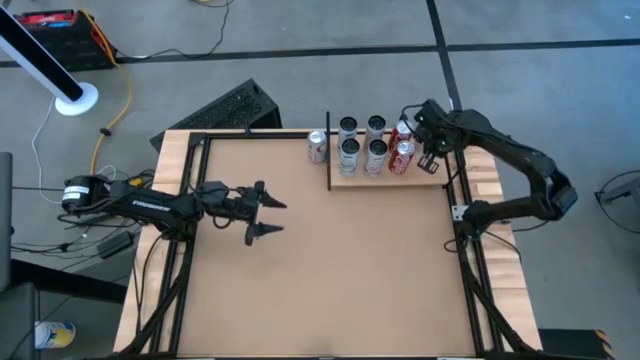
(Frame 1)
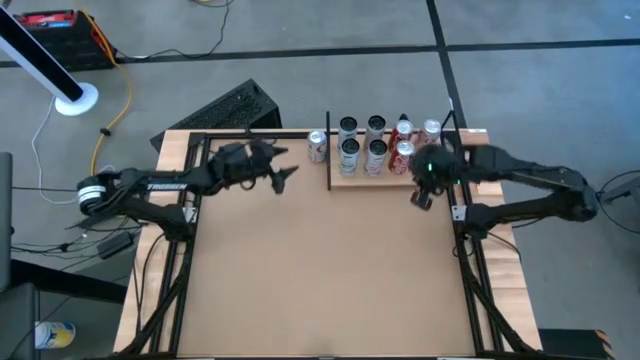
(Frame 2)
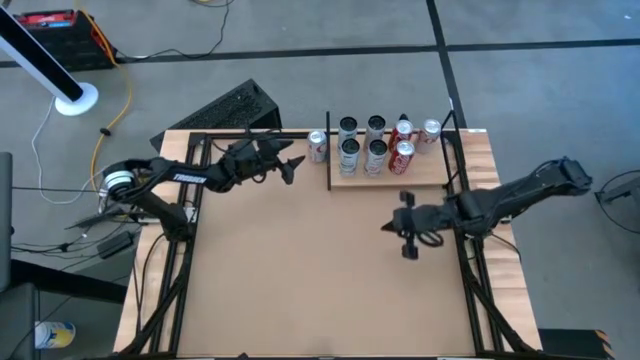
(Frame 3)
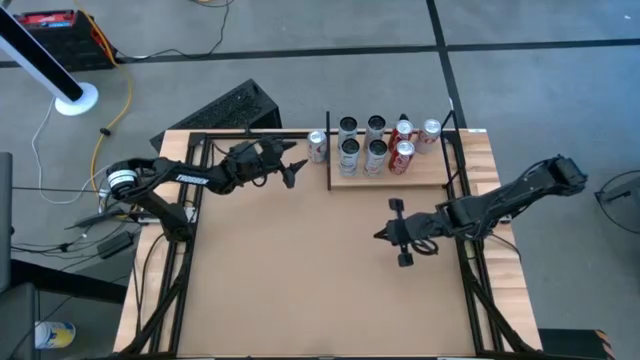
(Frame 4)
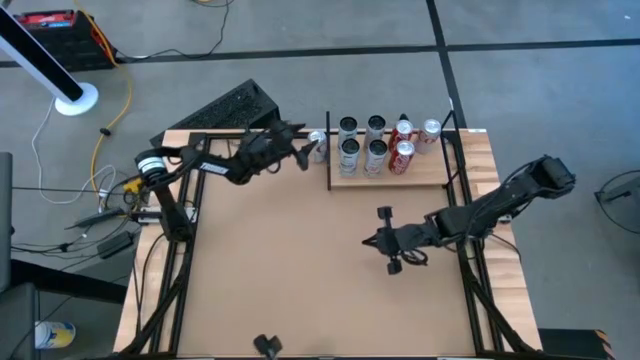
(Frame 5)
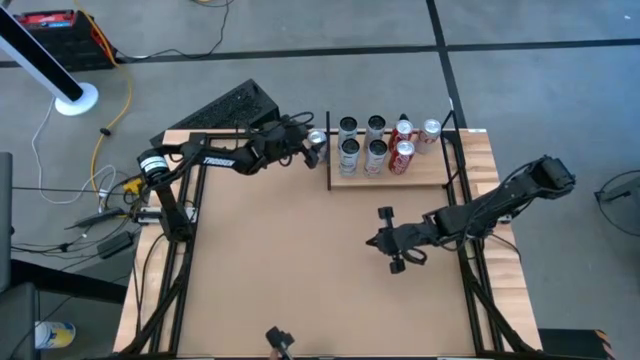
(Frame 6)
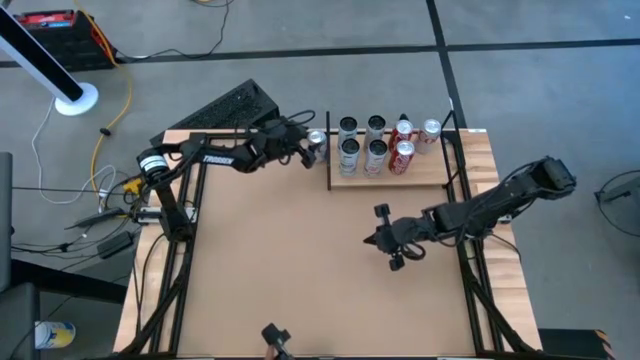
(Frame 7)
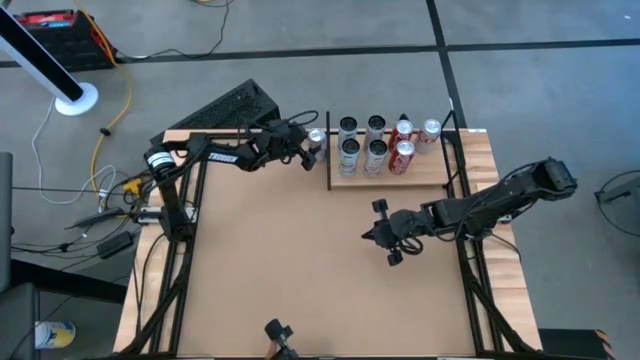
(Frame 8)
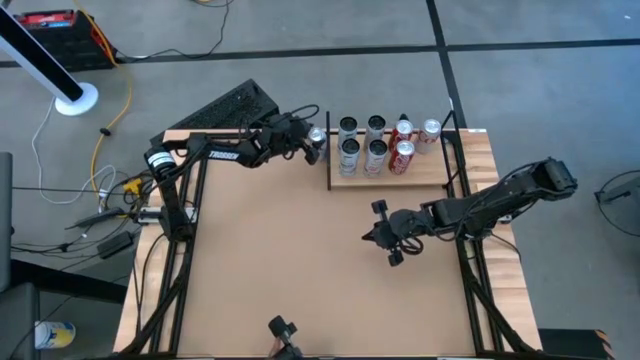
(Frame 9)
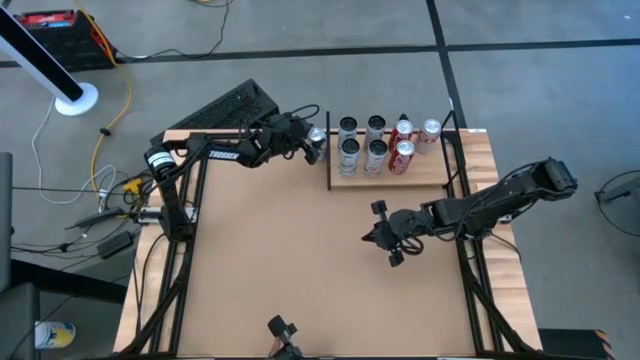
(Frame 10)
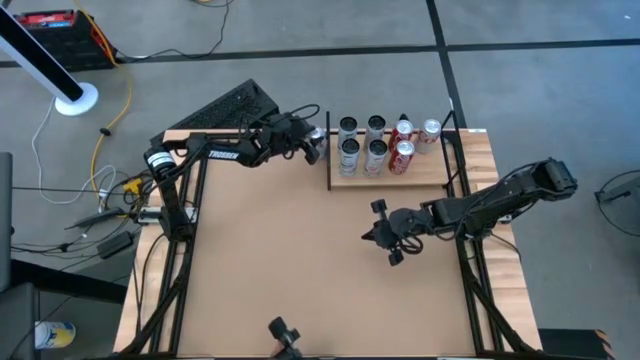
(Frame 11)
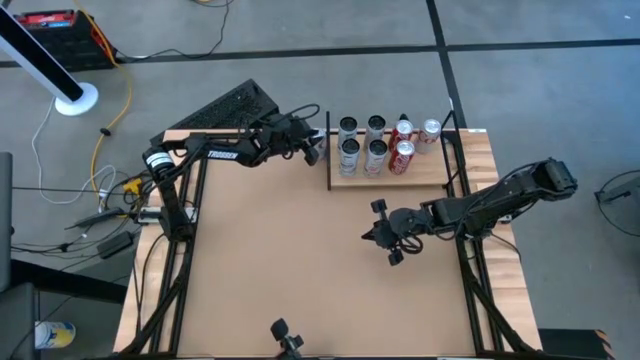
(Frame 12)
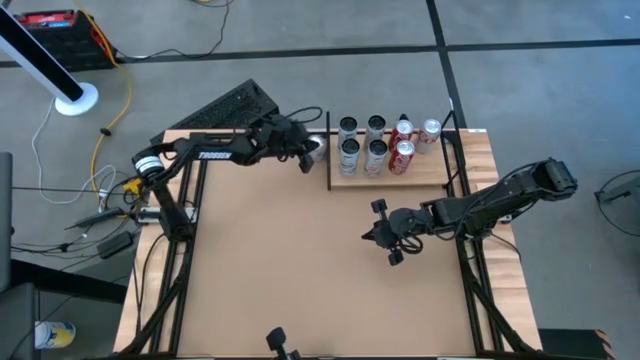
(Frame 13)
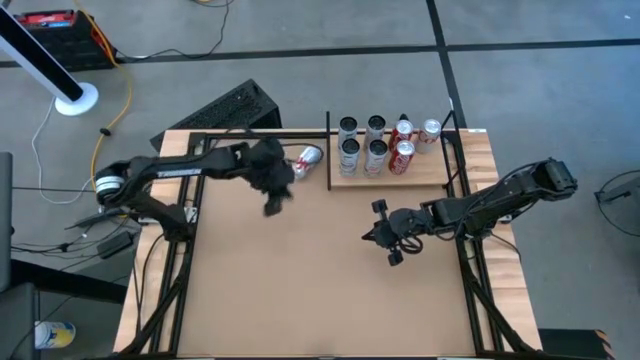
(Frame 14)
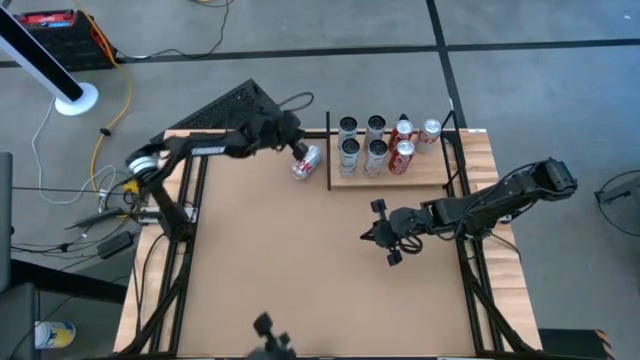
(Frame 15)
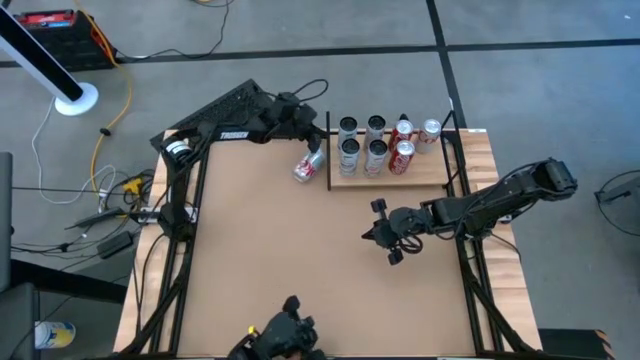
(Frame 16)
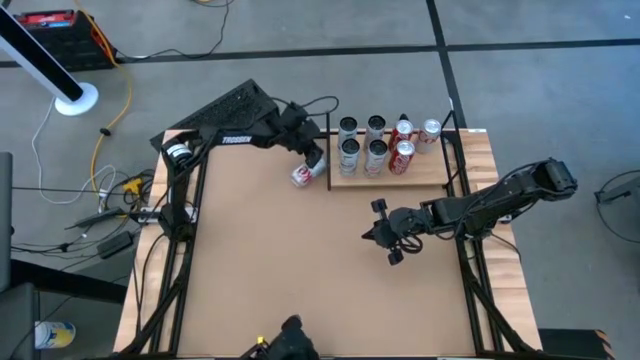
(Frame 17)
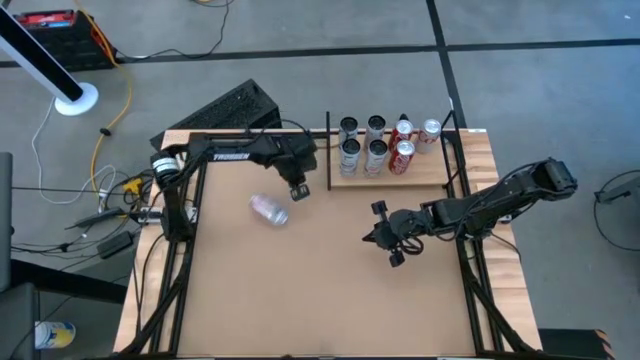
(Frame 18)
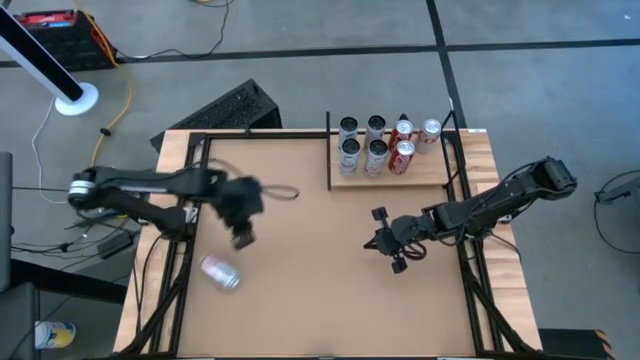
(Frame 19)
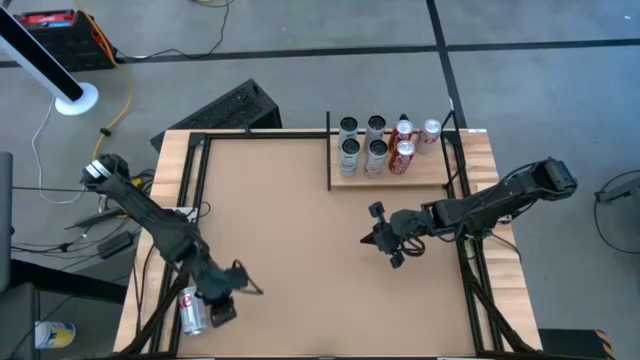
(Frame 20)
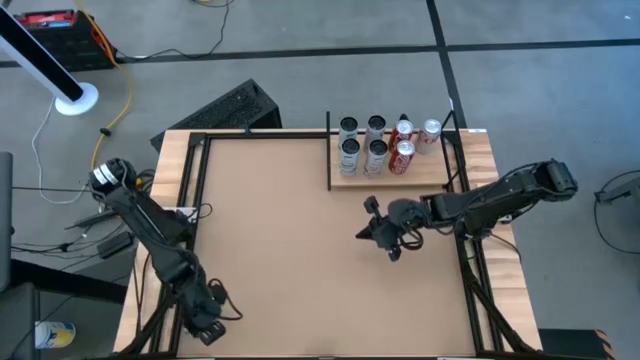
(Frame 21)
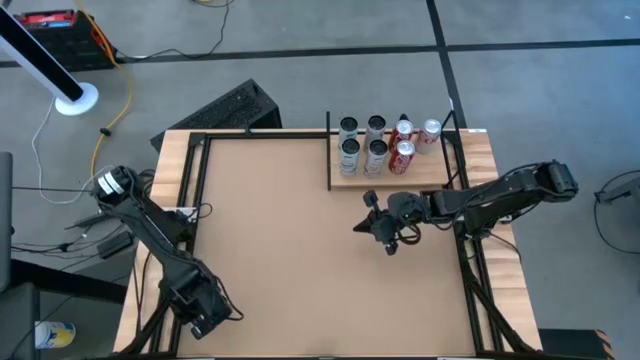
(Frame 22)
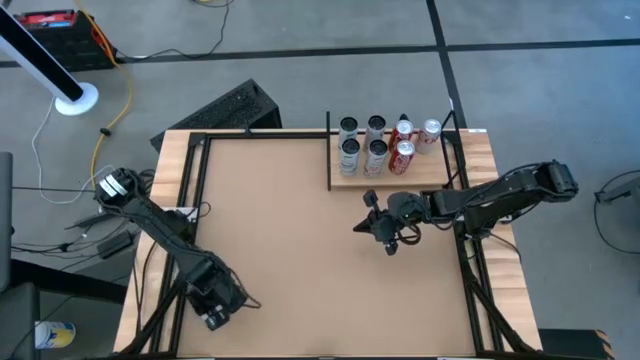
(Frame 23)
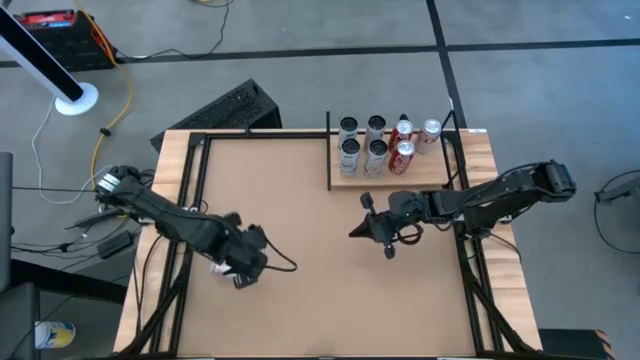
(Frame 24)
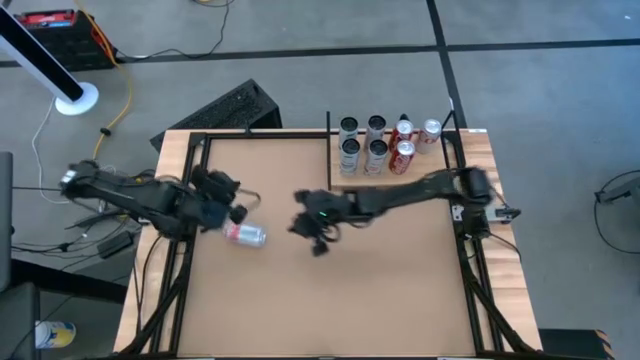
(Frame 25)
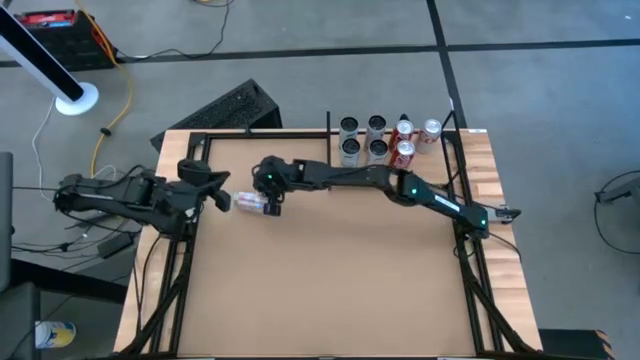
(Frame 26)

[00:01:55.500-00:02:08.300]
Task: Place canned beverage on shelf
Put the silver and red soda can on the shelf

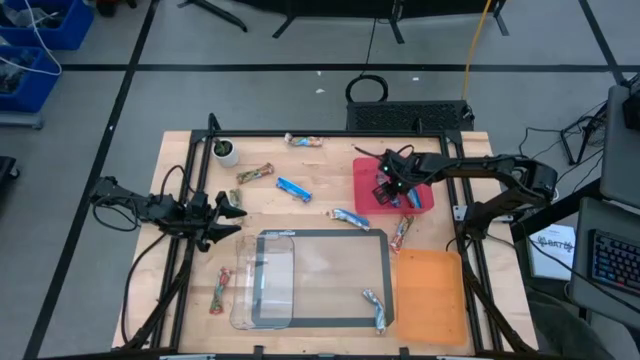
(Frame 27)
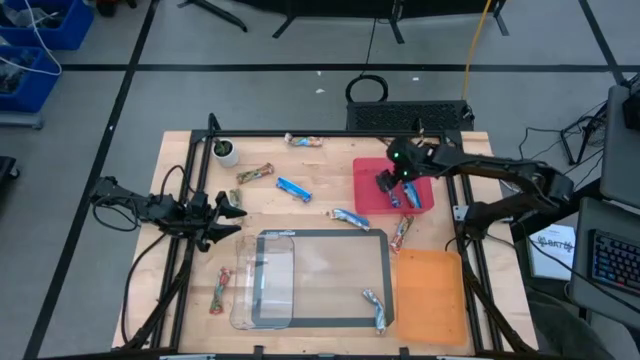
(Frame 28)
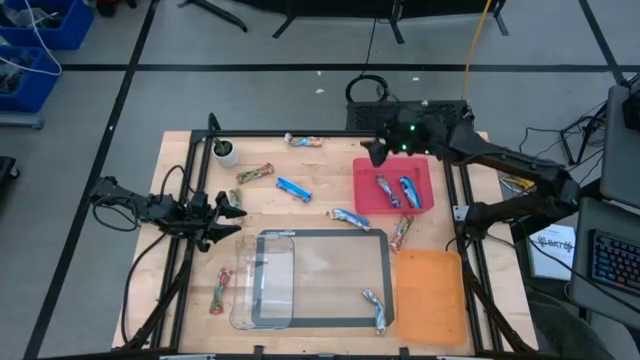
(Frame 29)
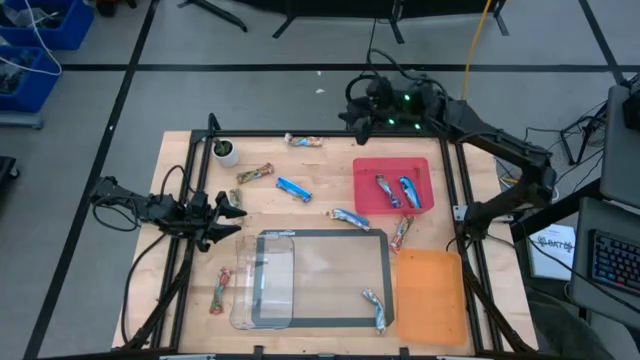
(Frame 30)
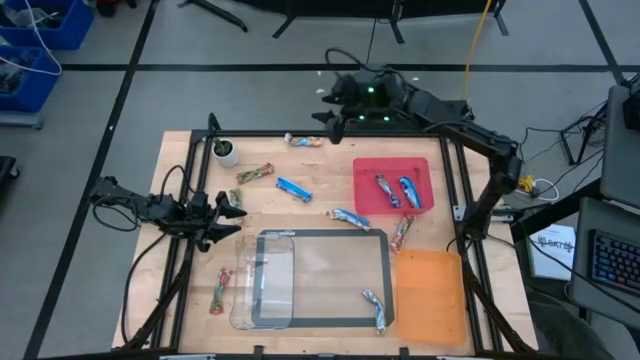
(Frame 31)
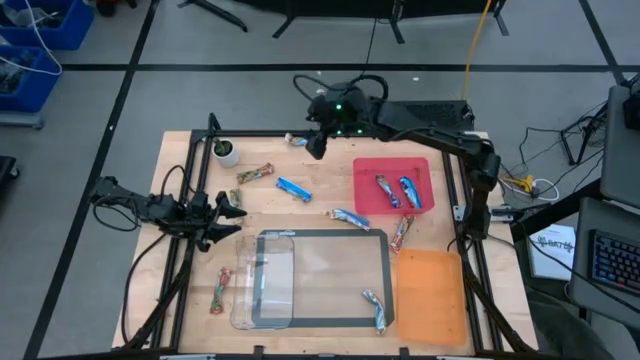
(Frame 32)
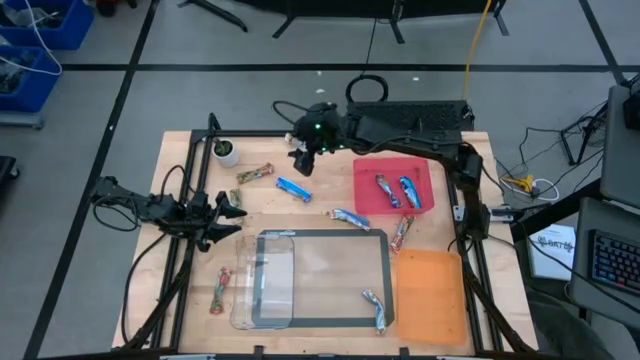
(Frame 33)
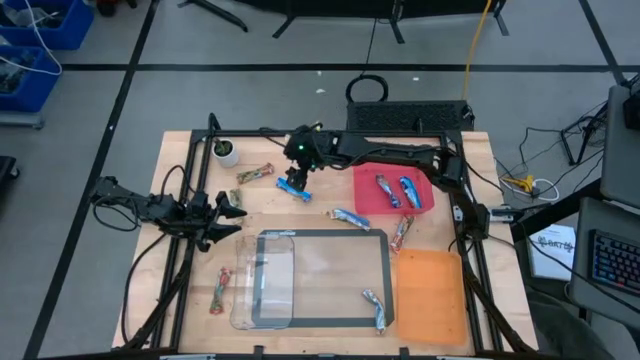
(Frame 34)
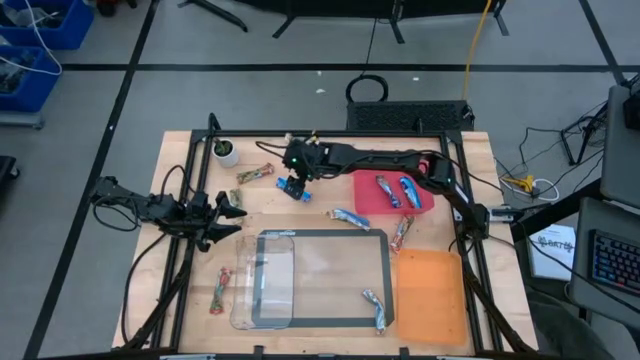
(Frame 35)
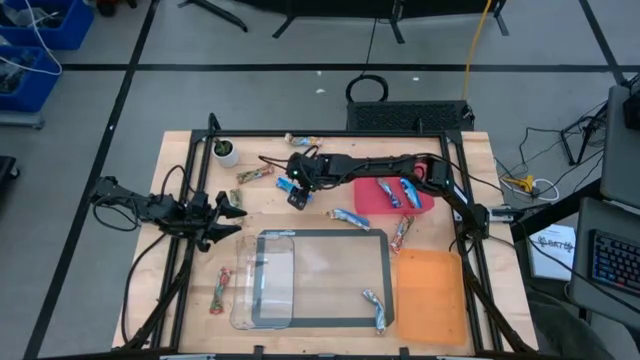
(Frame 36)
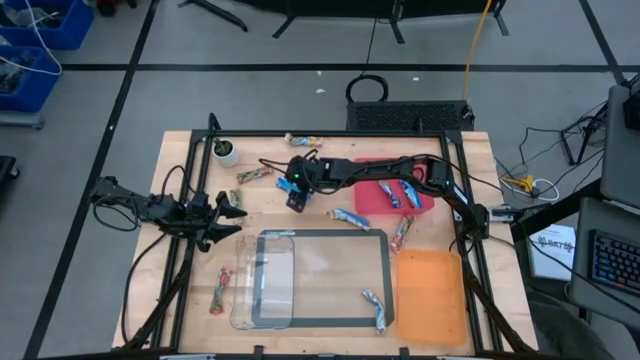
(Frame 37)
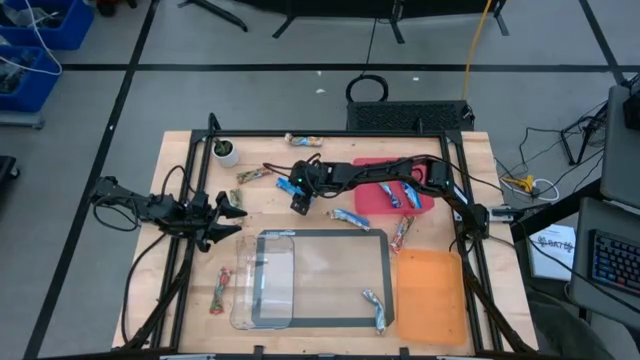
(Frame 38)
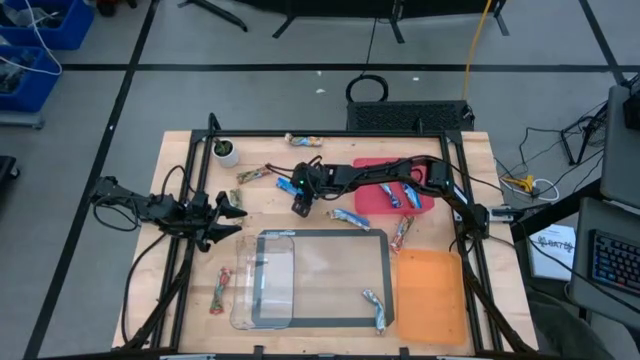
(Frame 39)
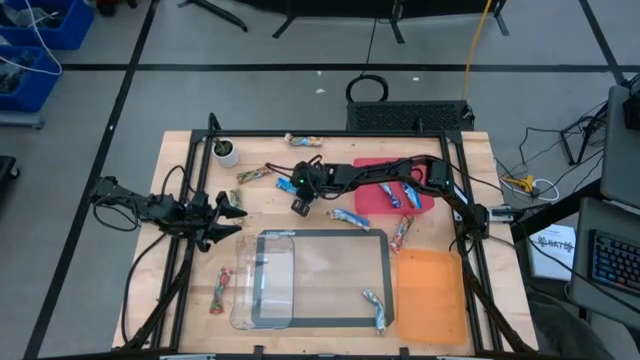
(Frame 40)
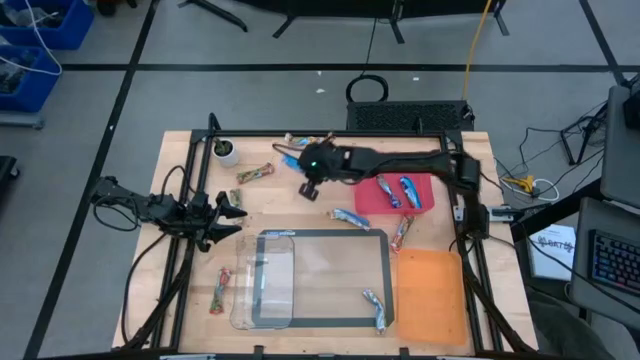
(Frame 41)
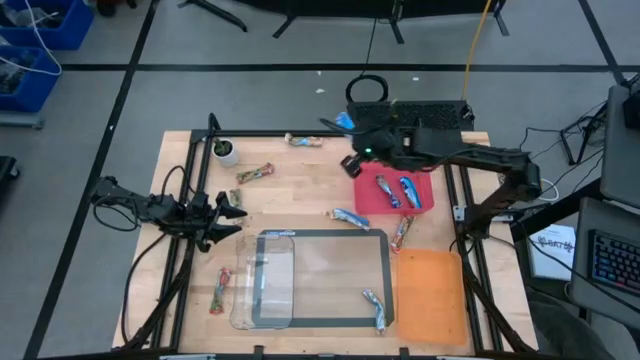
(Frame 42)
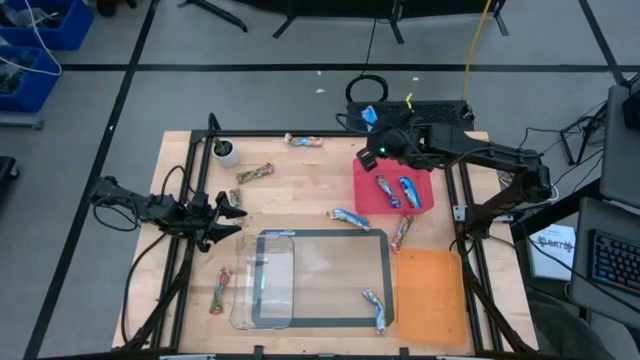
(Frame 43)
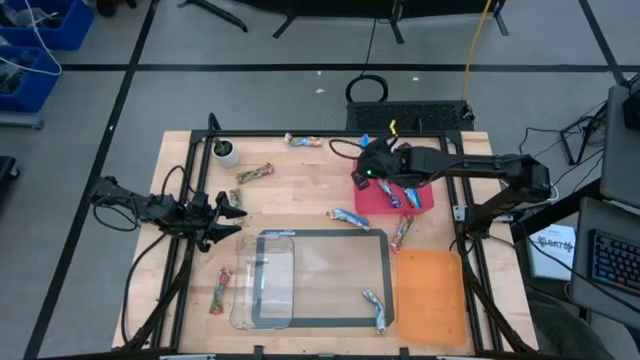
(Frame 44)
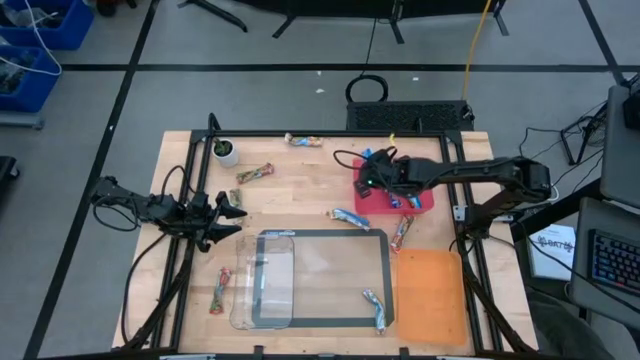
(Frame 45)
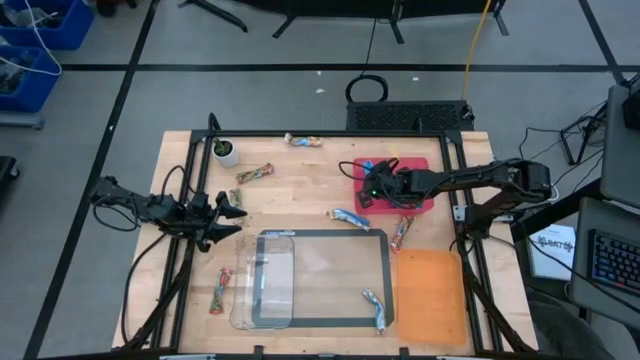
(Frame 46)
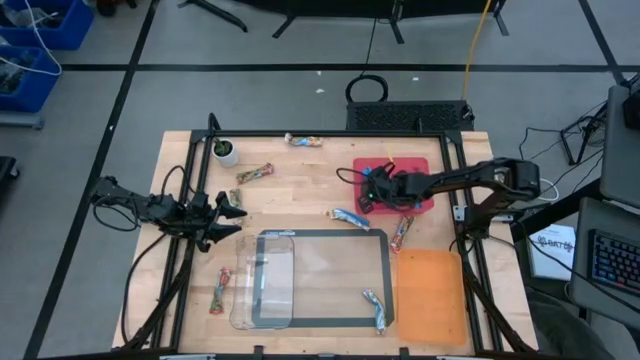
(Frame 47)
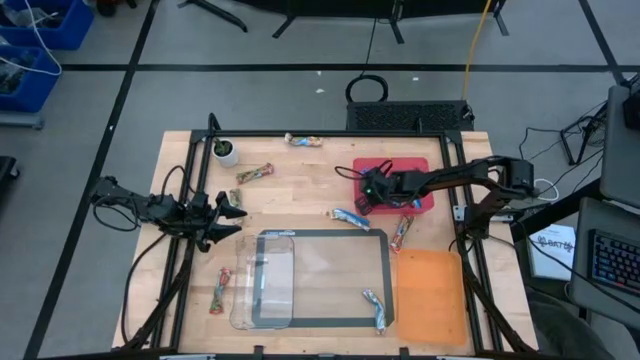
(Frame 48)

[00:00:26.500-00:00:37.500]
Task: Pick and place Granola Bars by type
Put the blue granola bar into the red bin
